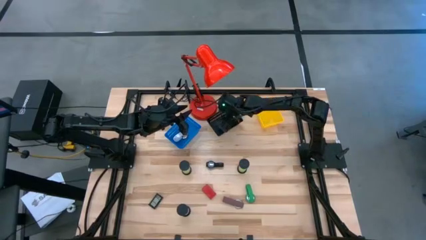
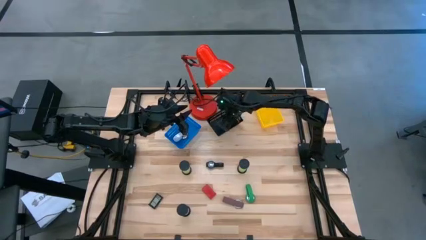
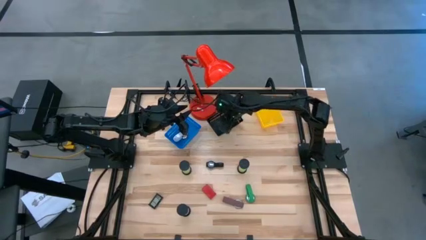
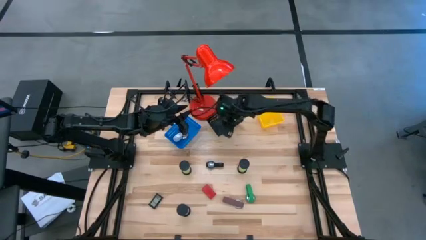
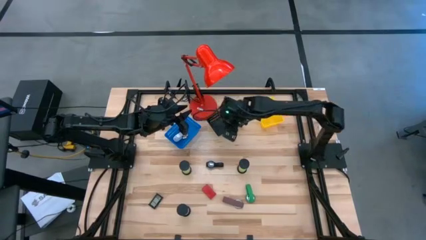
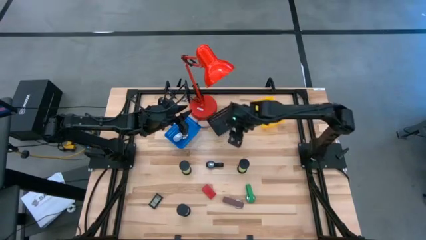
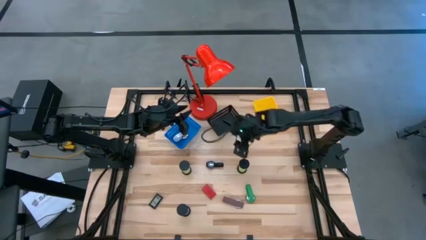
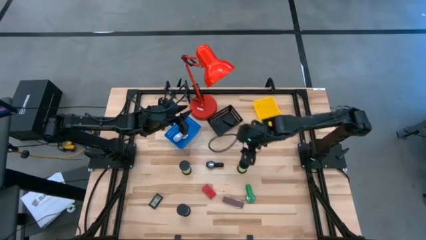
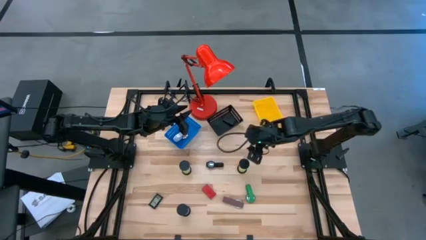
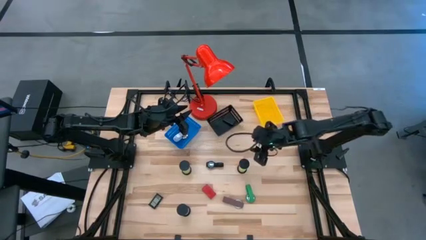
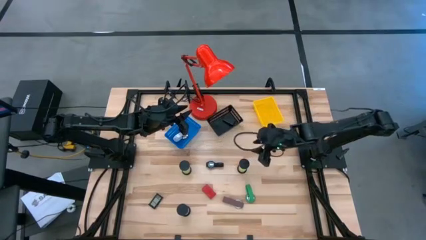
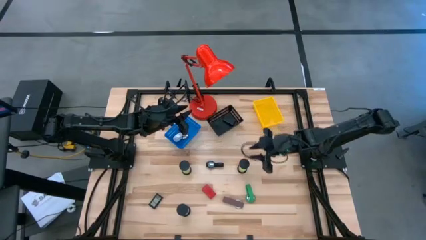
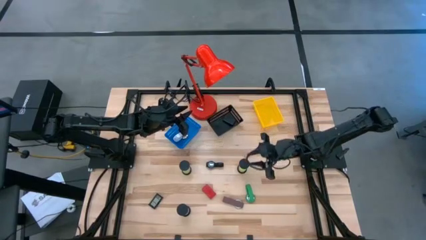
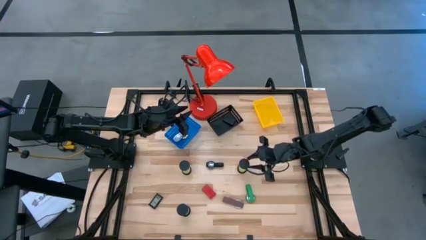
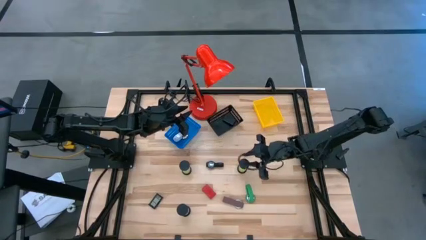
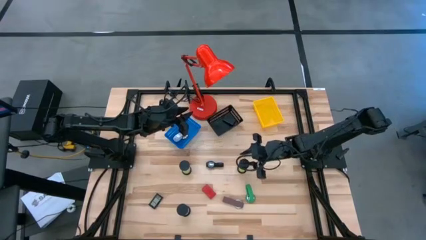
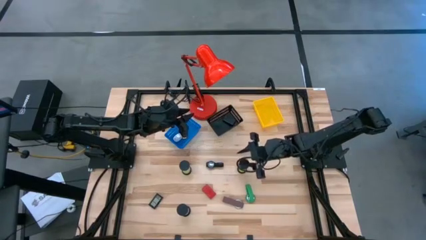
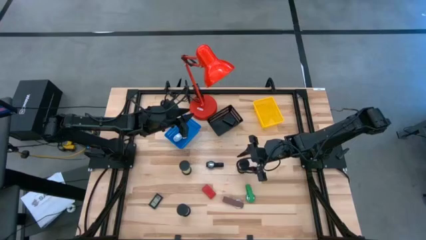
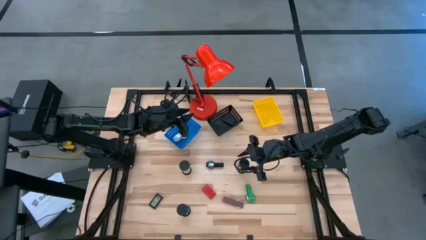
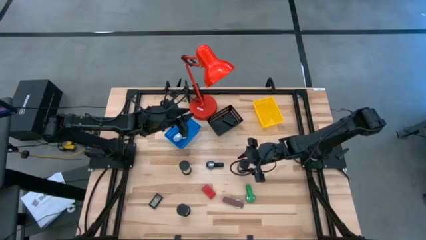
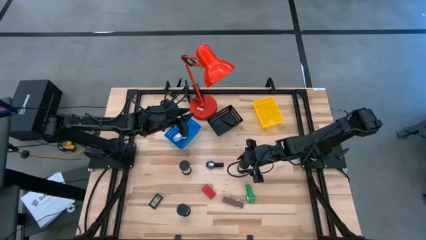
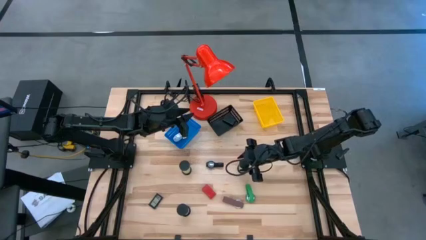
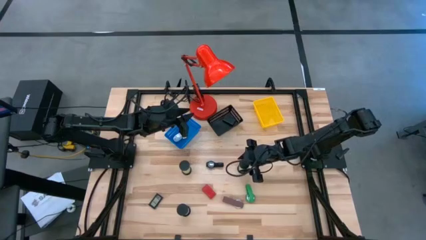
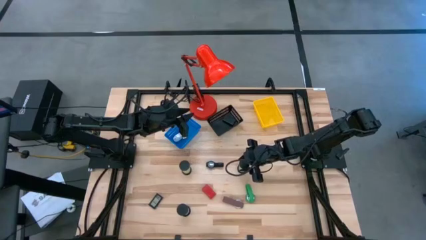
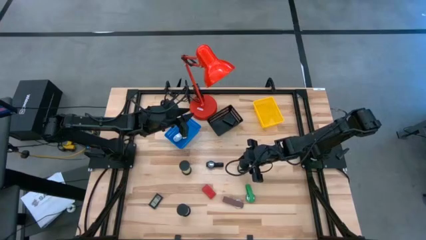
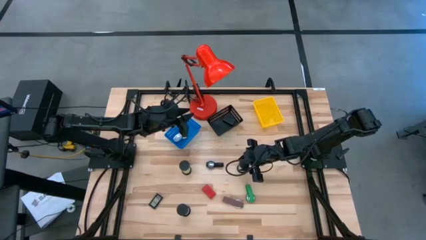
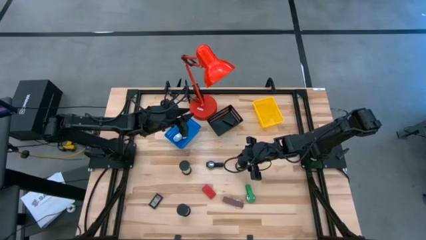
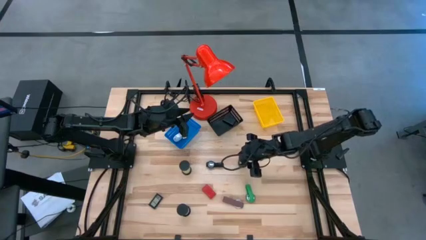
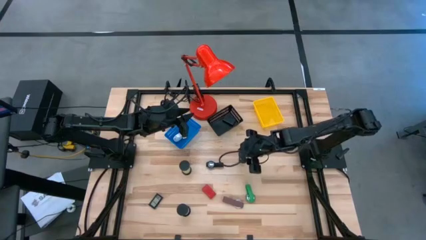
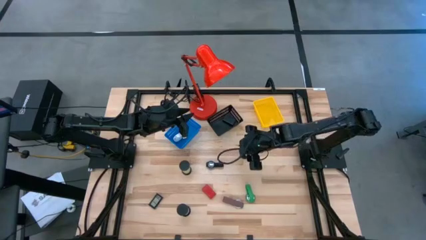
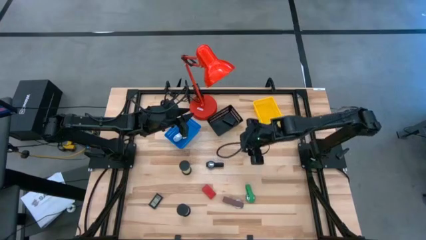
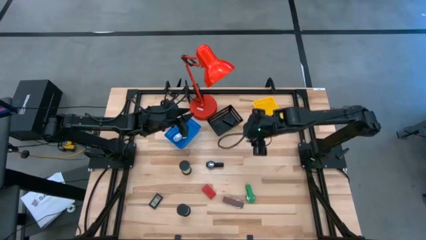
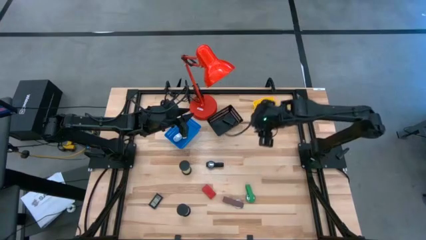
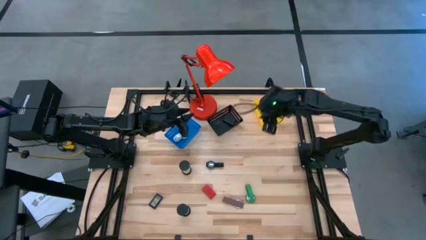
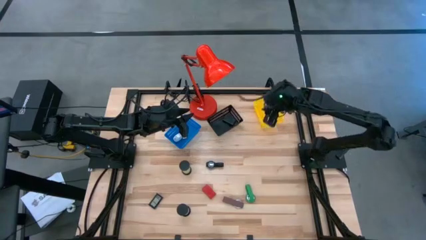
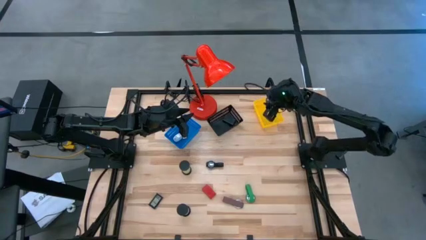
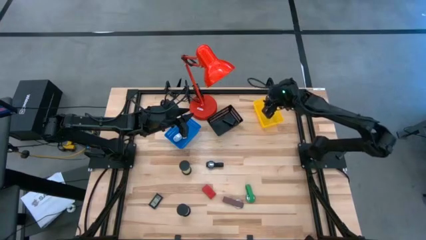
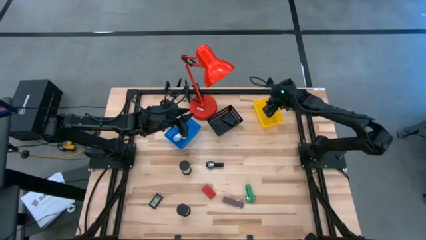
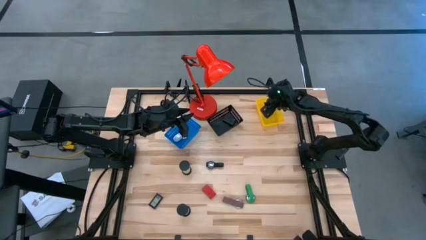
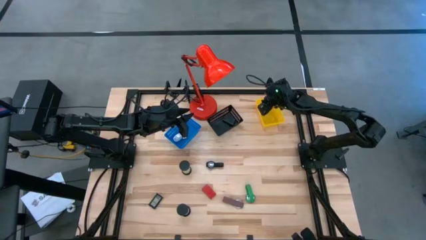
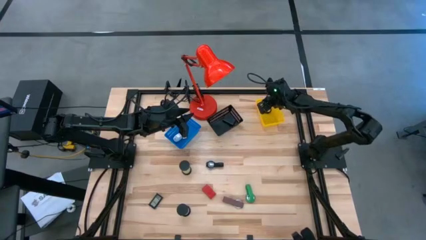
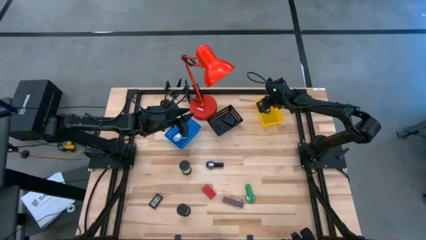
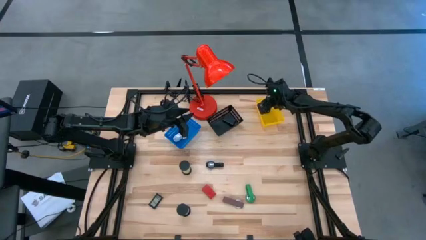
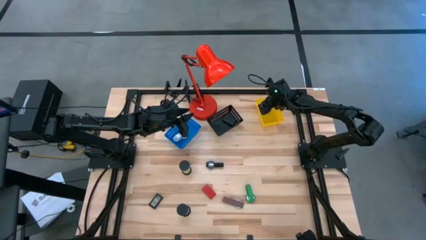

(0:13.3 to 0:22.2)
Task: Pick & Place Office items
Put the right green hourglass into the yellow bin

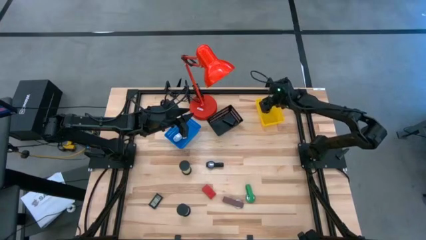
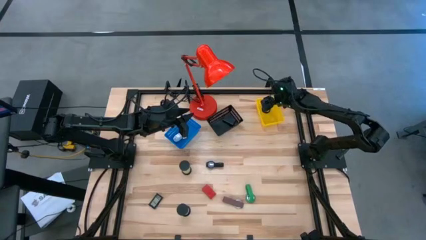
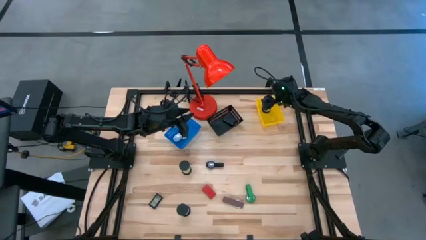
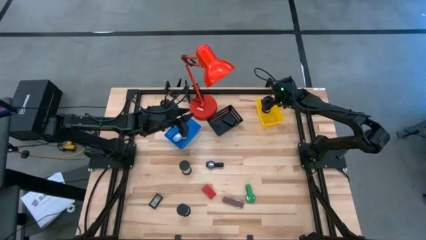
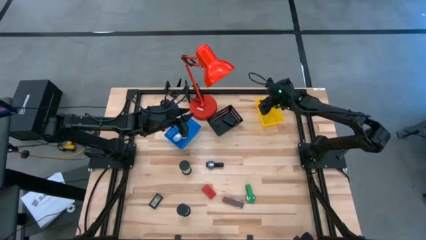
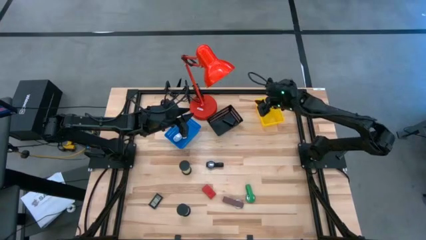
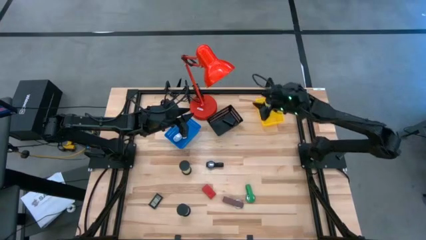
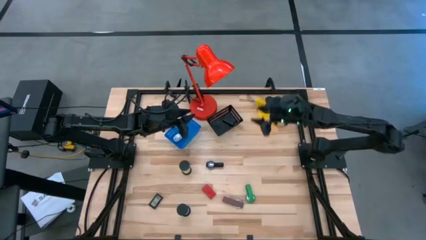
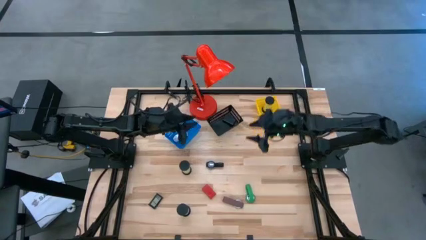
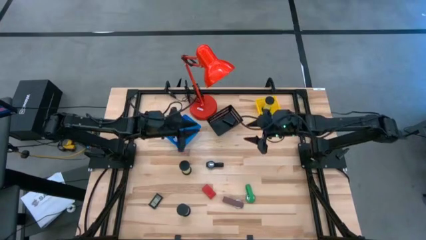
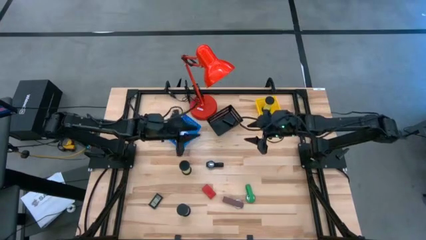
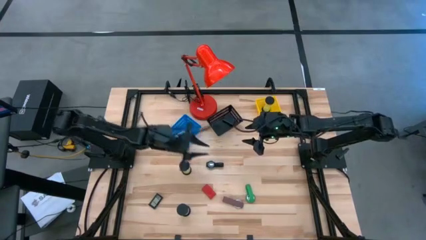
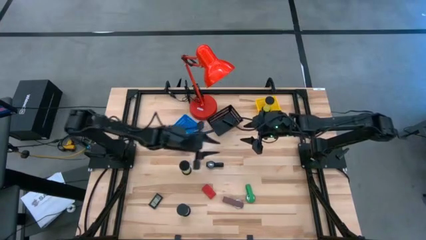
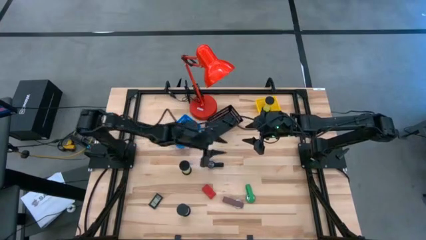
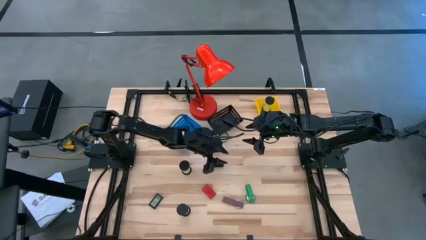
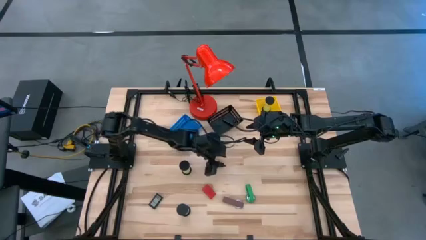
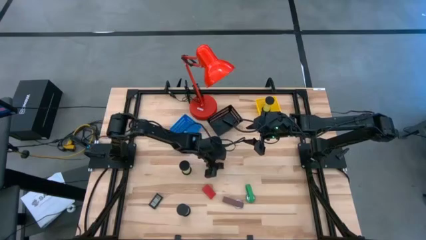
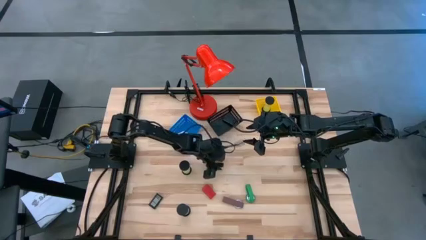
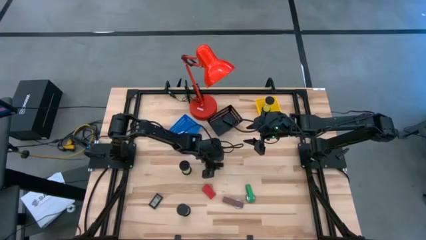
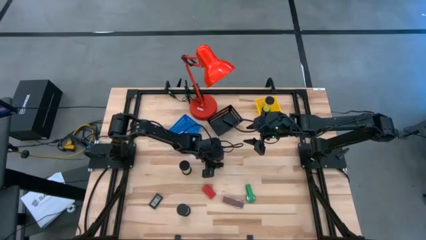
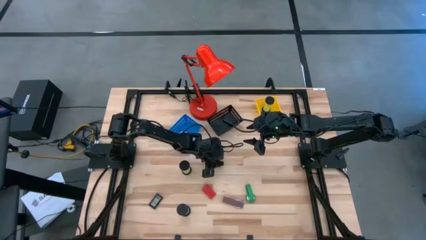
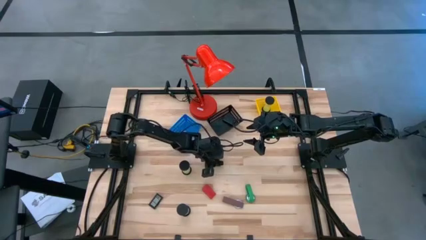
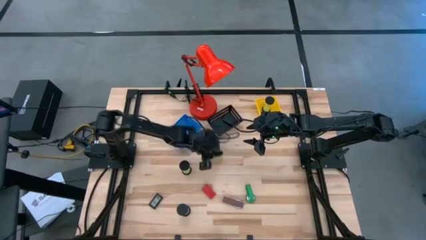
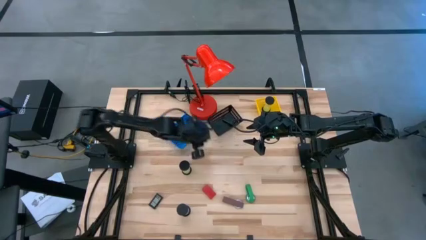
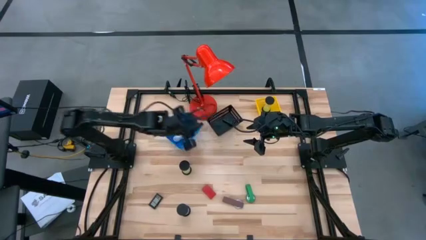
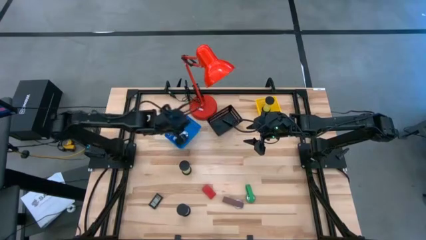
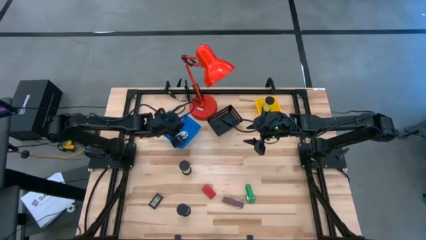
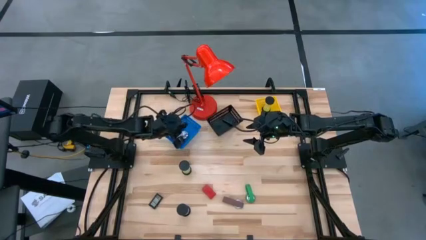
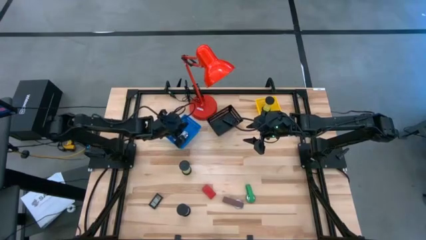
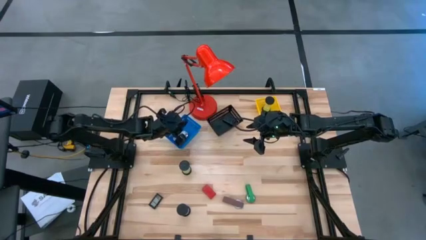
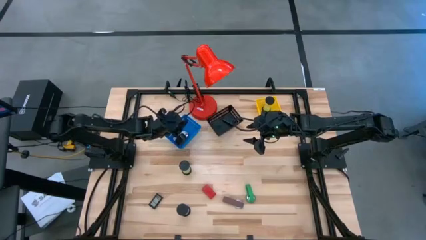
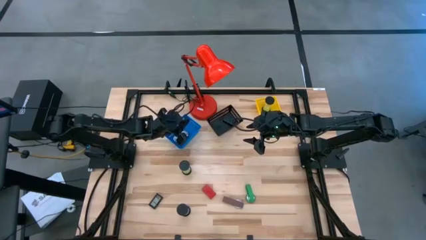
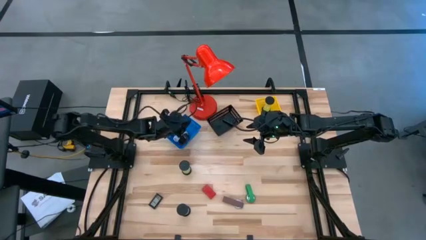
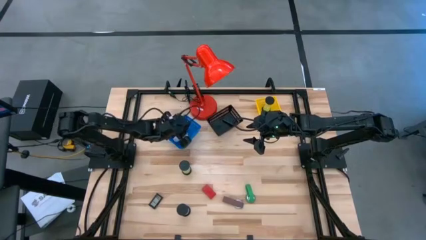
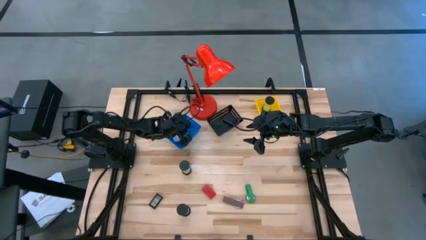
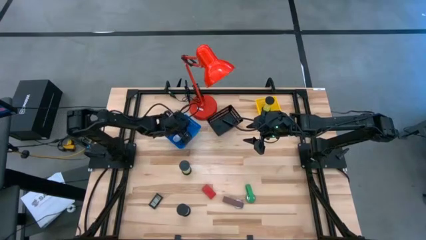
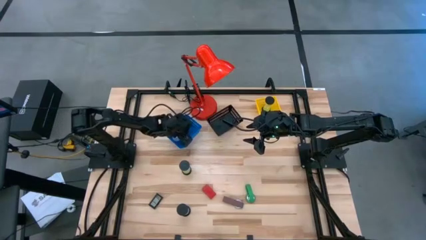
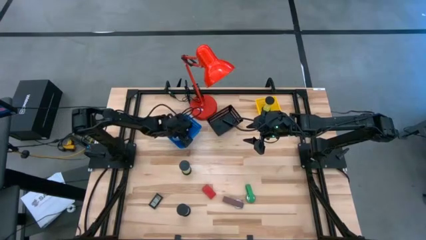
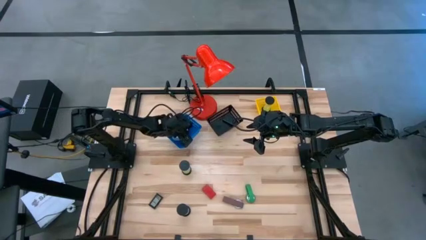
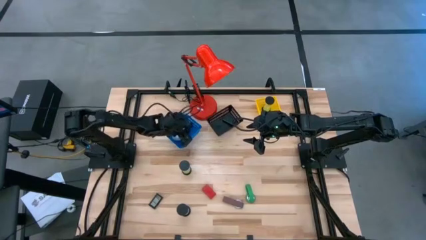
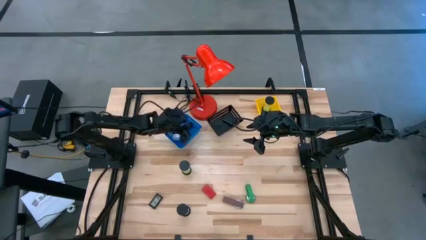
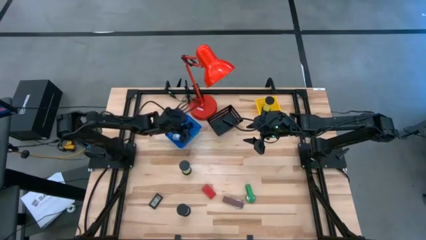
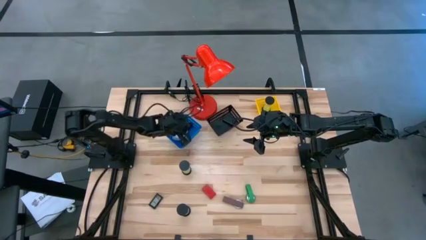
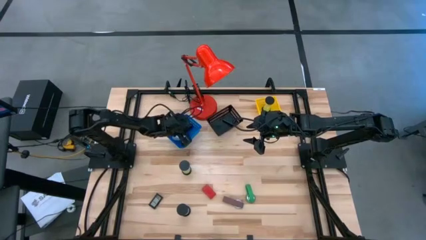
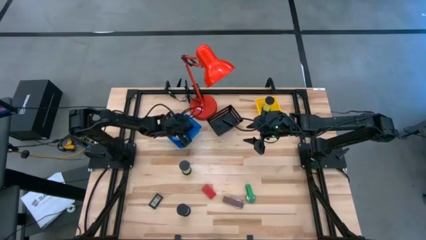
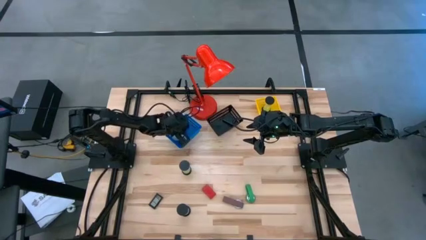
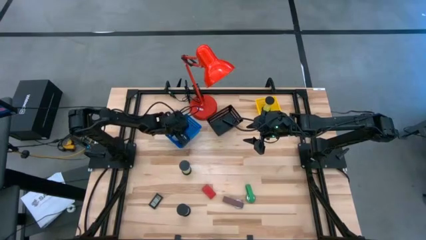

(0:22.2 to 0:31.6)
Put the black wristwatch into the blue bin
